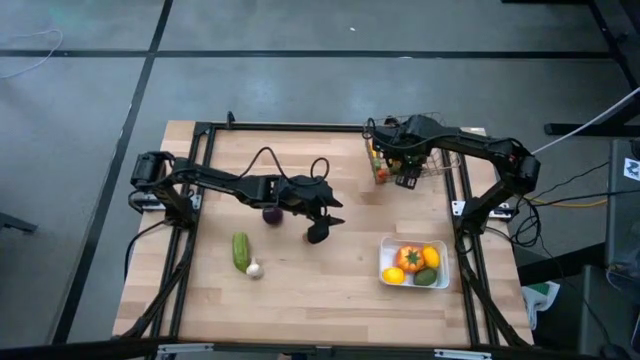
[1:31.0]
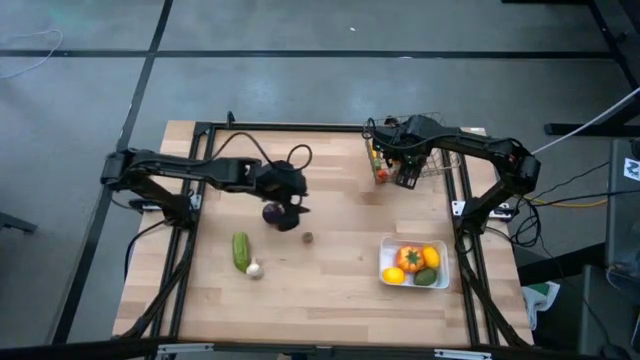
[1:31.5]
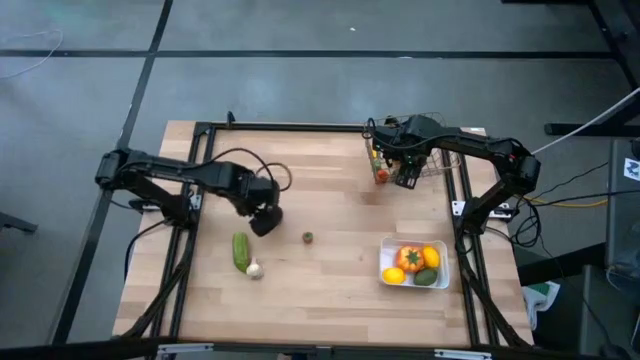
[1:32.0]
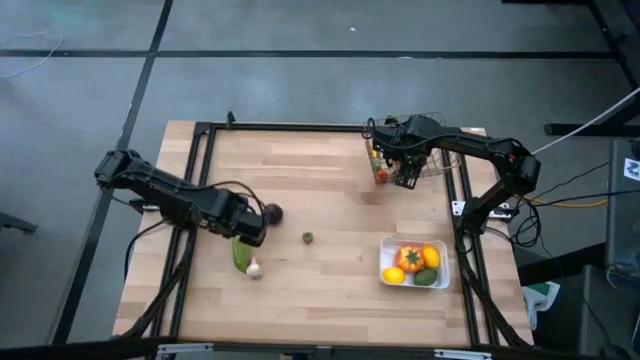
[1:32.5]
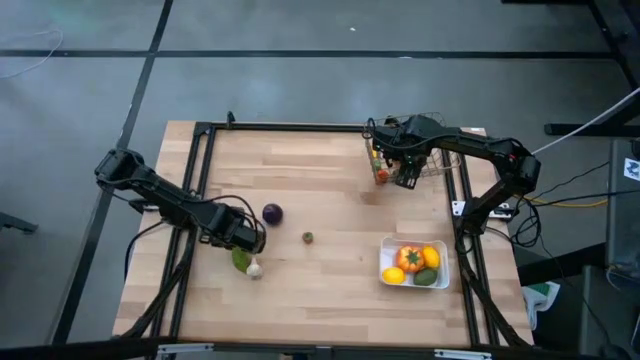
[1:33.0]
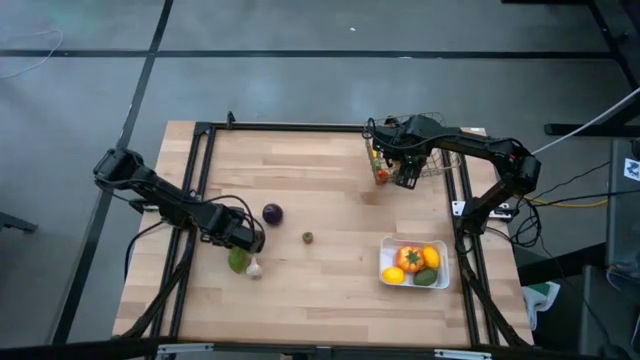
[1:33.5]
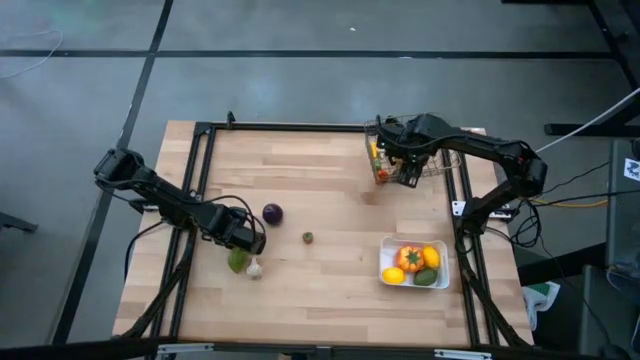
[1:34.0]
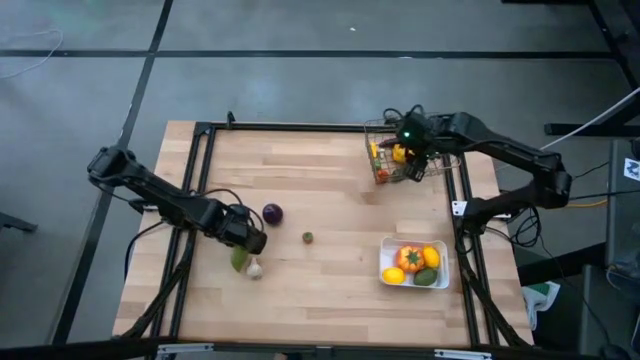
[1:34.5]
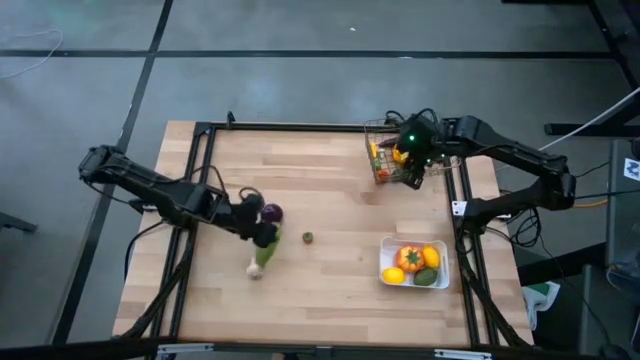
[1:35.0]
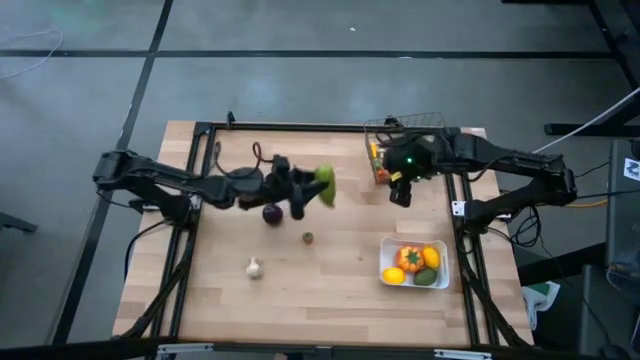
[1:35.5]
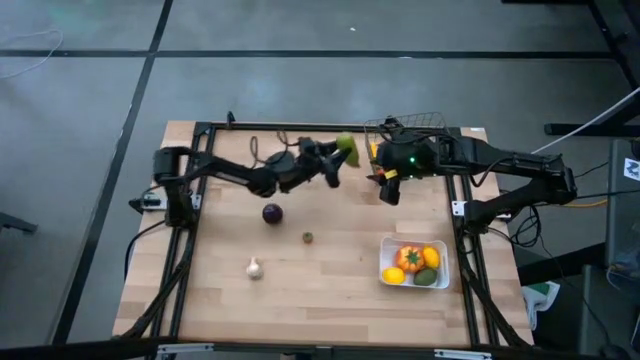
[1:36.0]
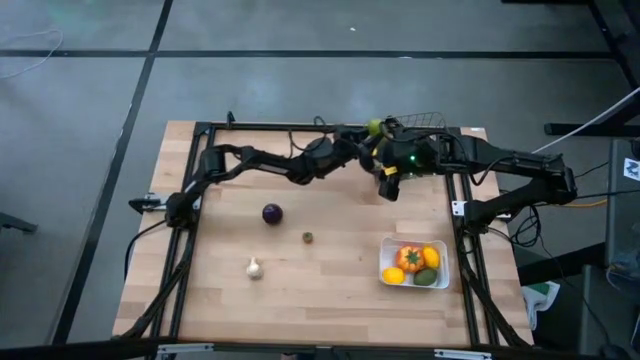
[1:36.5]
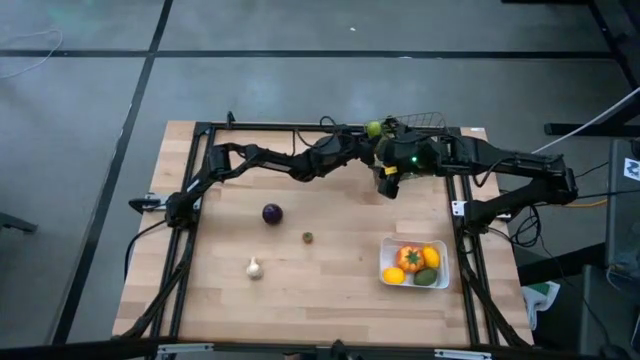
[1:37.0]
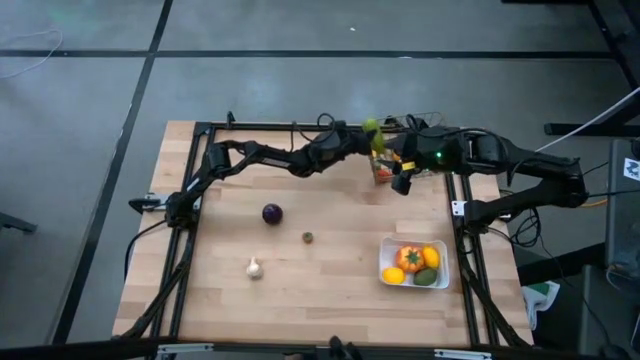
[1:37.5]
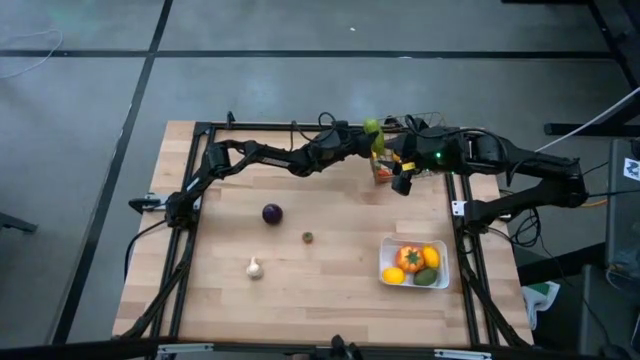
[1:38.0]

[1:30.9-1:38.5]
Task: Sort produce into baskets
Put the green chayote into the black wire basket

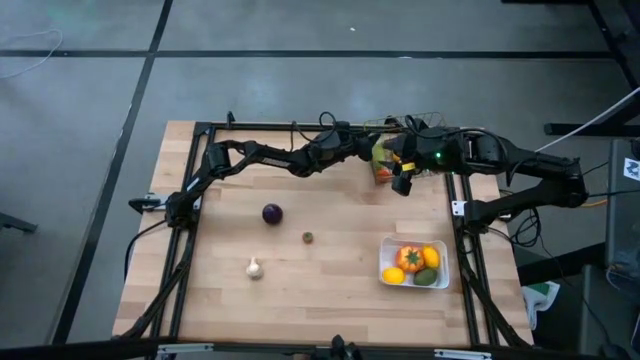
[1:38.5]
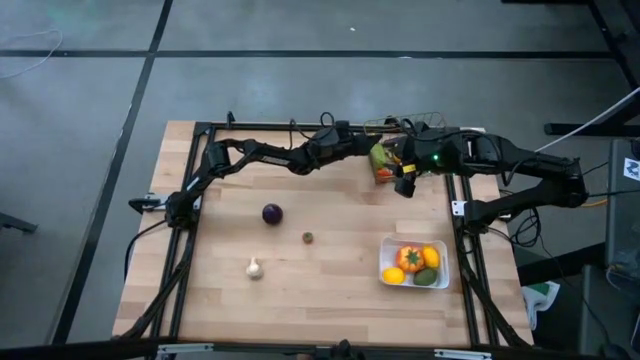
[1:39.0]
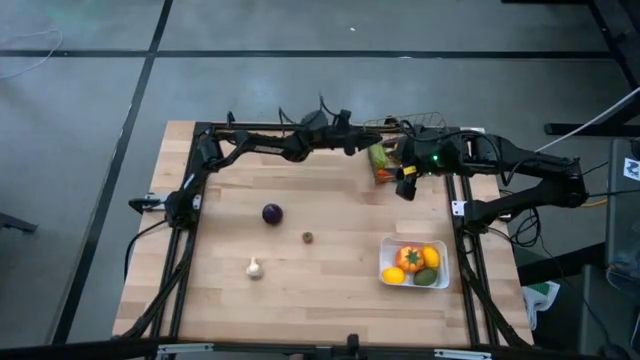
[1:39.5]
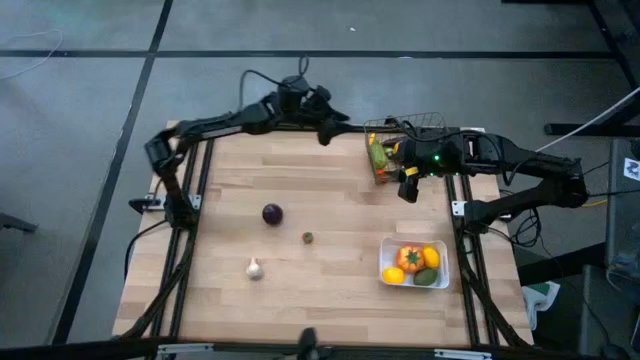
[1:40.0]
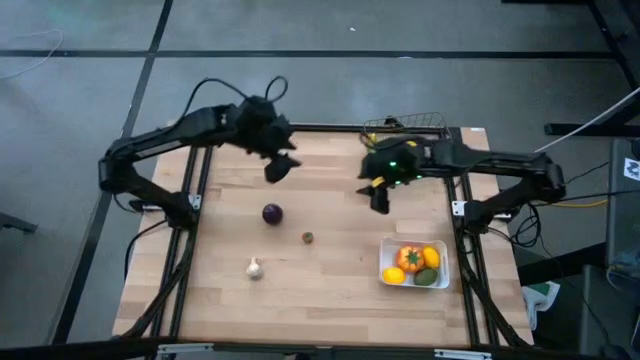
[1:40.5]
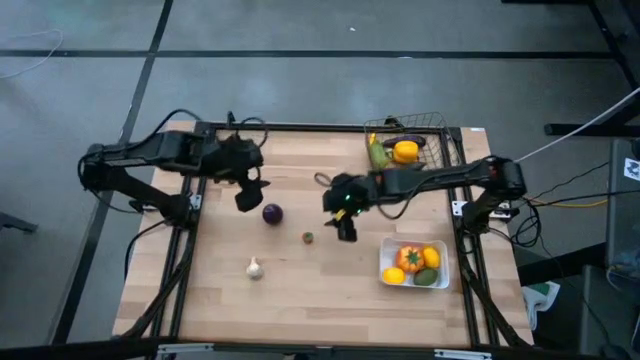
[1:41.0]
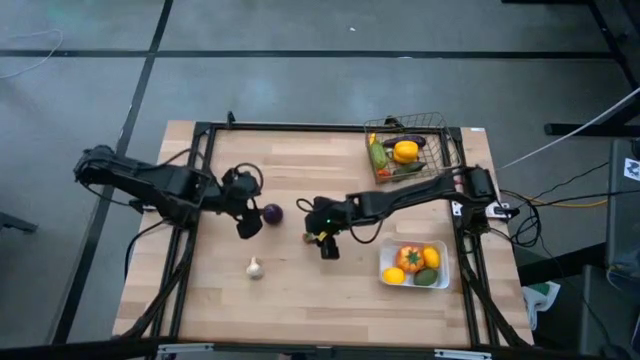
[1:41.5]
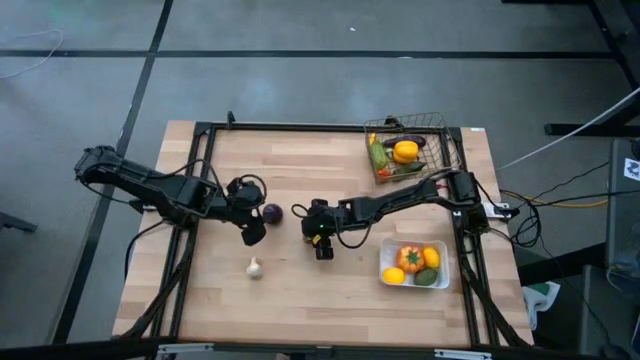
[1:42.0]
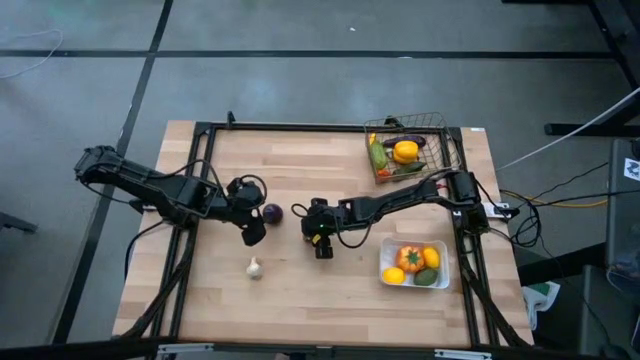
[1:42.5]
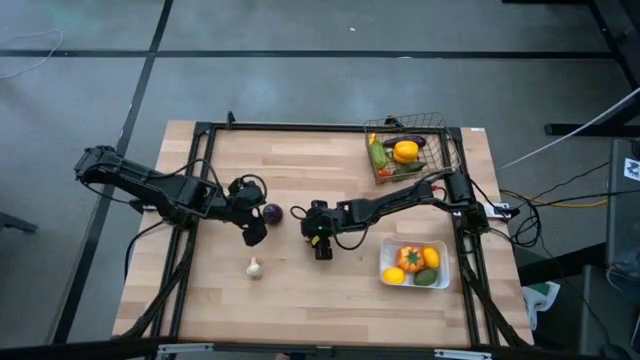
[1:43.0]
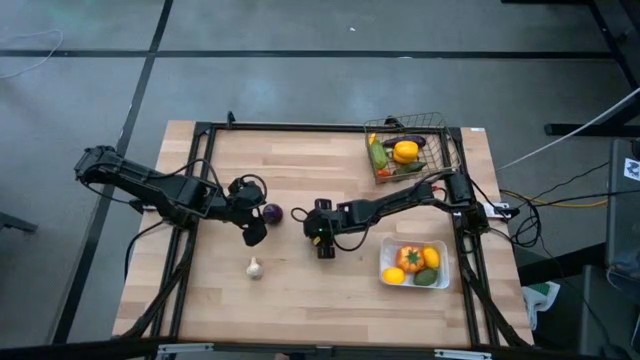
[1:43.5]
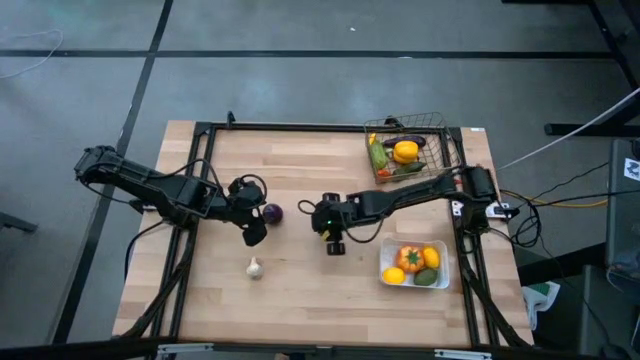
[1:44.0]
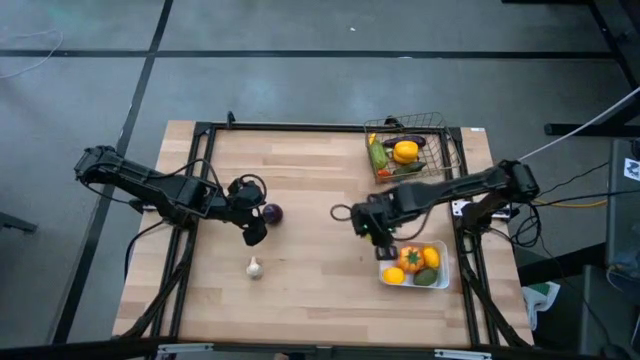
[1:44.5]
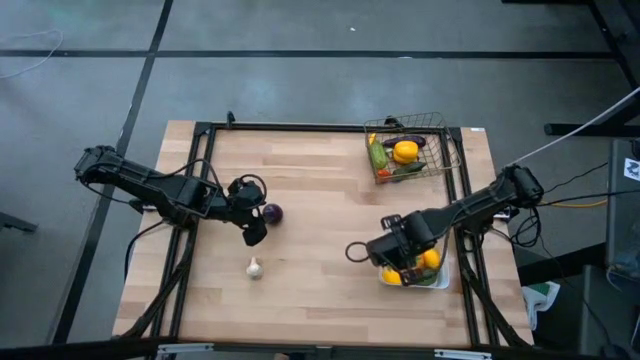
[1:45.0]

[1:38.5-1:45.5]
Put the orange tomato into the white bin

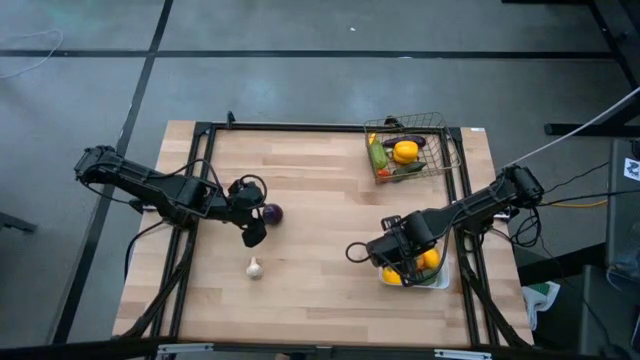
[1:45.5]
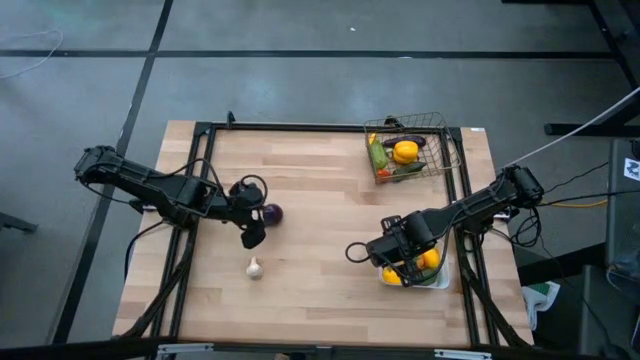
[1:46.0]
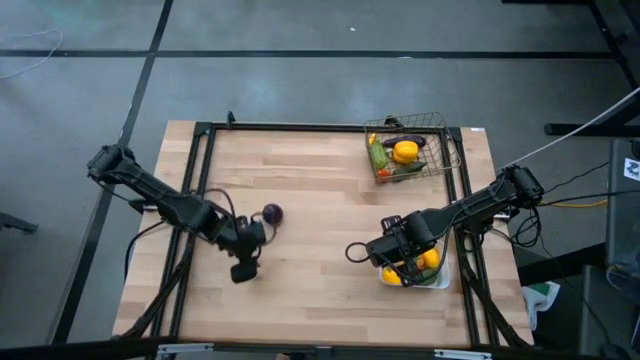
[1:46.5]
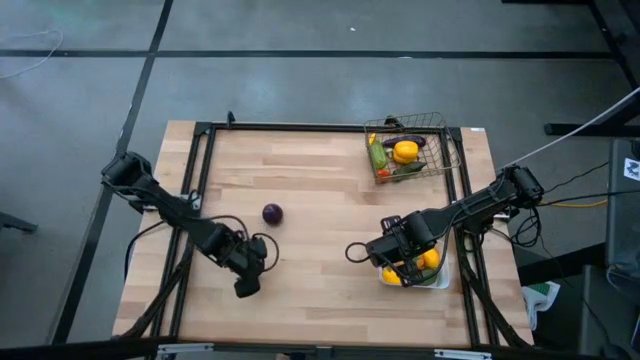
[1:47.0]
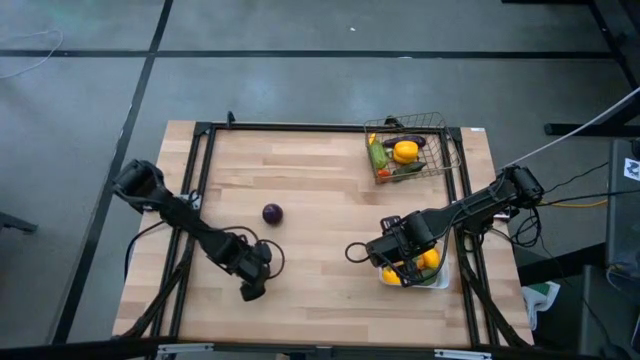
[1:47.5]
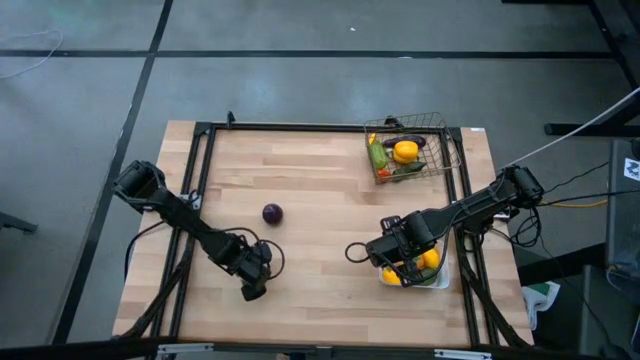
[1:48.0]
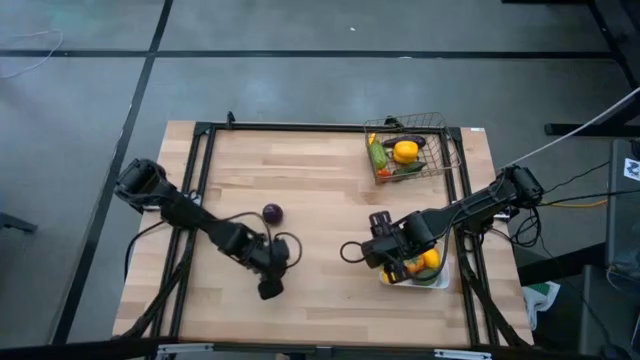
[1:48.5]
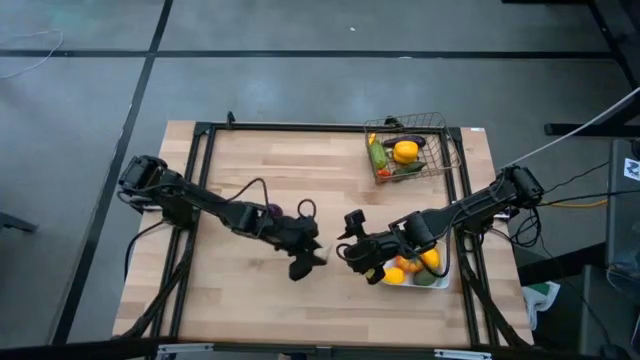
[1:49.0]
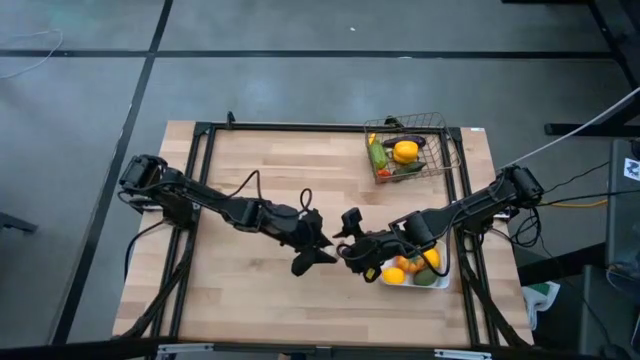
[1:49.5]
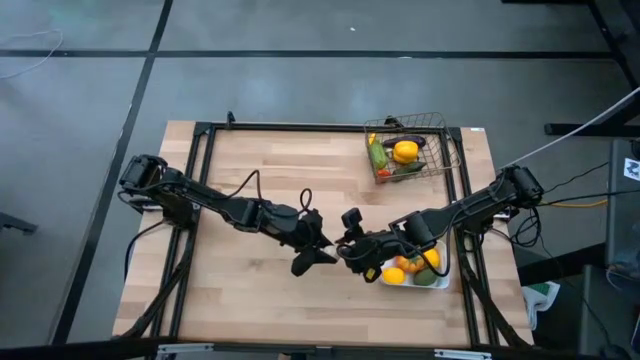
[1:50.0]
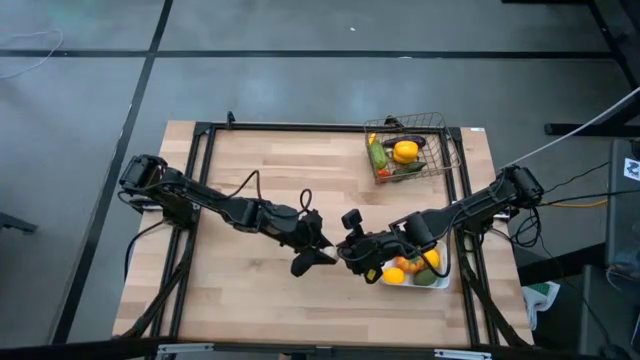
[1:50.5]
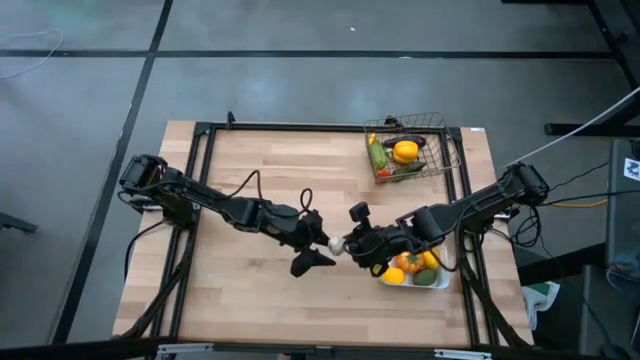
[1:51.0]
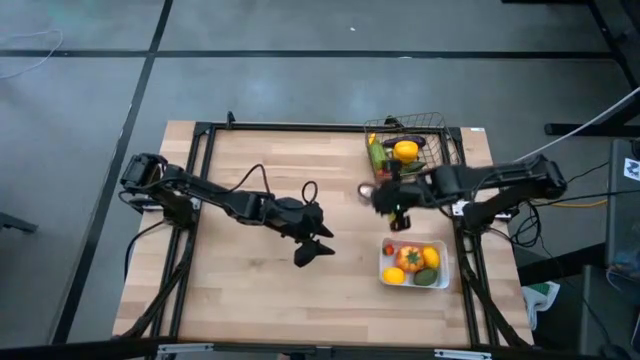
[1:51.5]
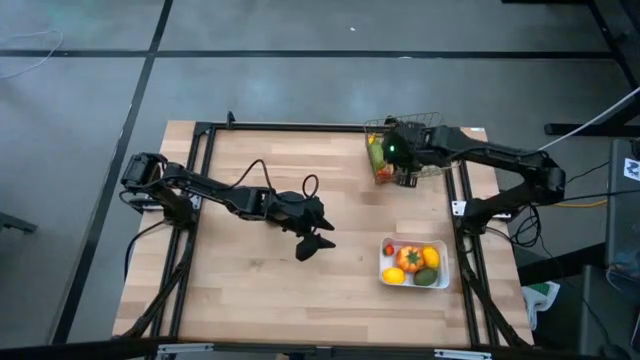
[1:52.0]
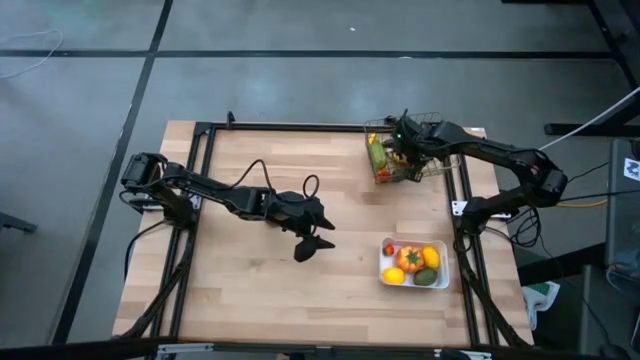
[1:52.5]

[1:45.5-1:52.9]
Put the white garlic into the black wire basket
